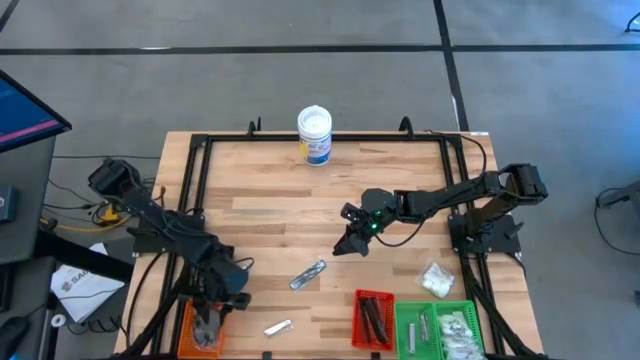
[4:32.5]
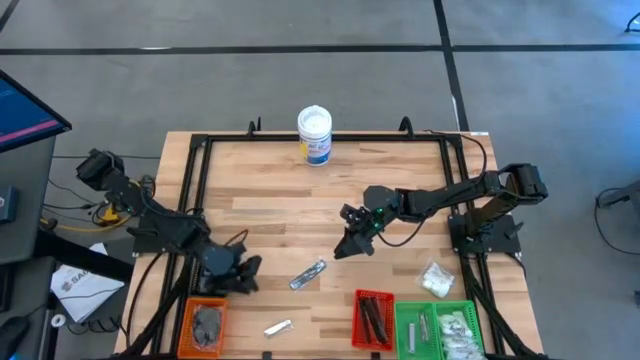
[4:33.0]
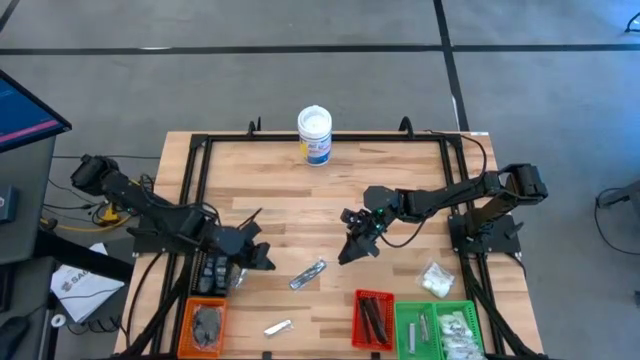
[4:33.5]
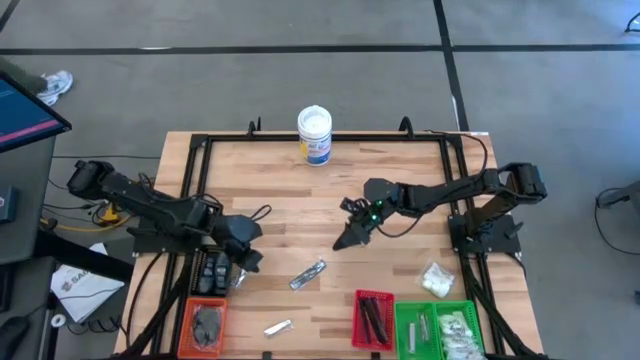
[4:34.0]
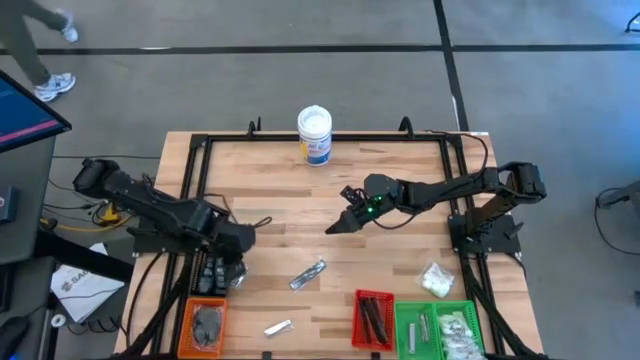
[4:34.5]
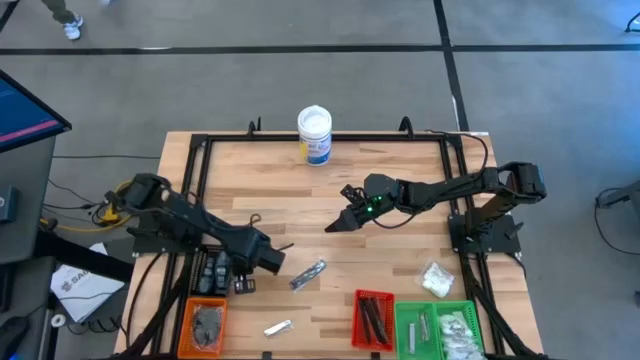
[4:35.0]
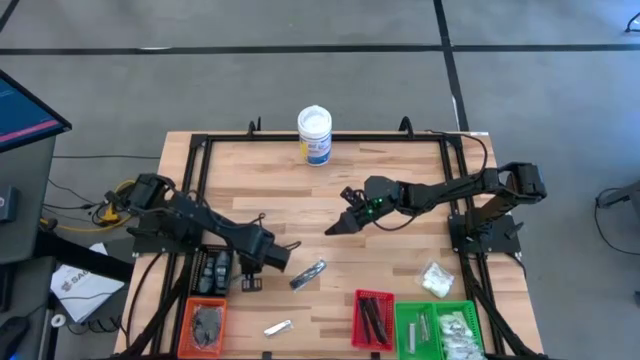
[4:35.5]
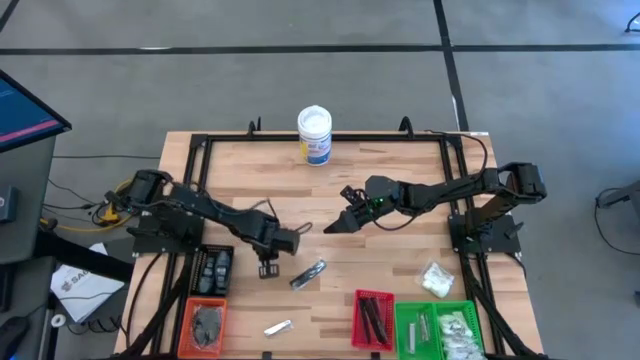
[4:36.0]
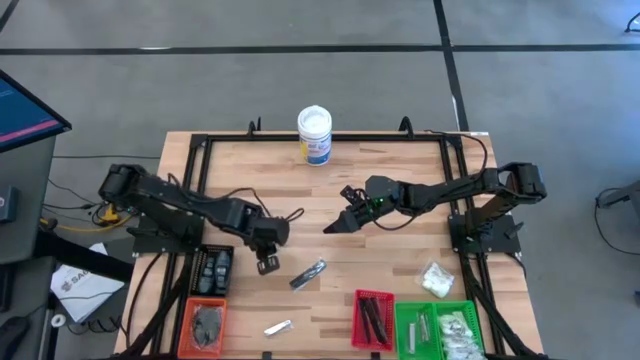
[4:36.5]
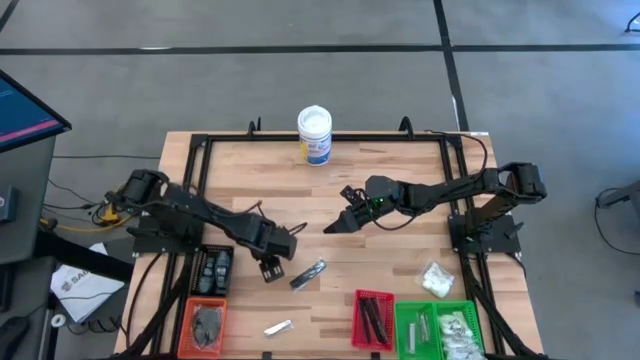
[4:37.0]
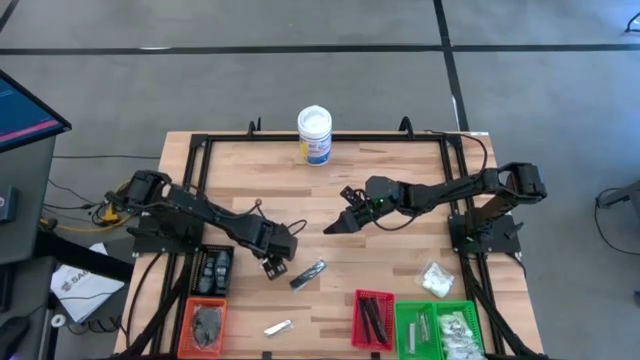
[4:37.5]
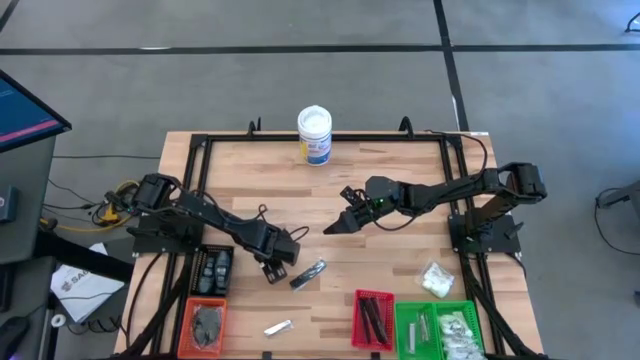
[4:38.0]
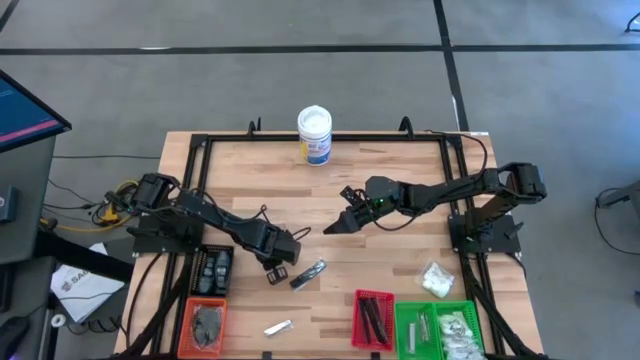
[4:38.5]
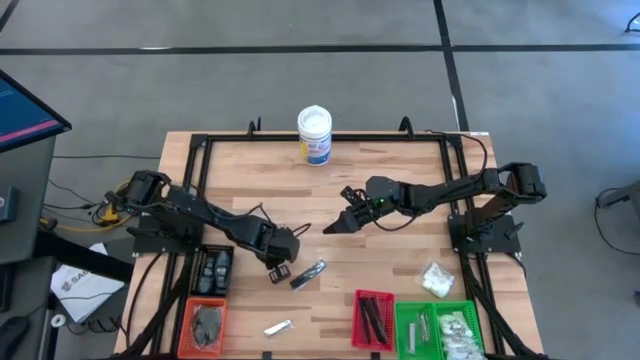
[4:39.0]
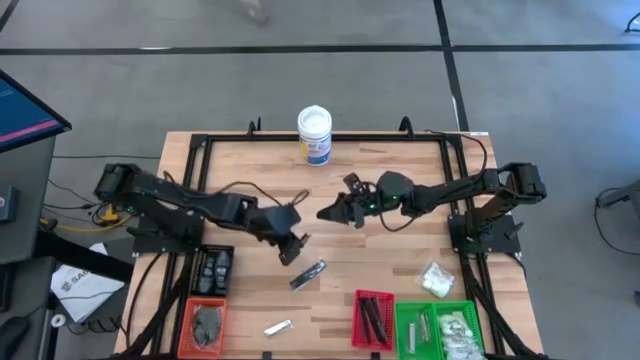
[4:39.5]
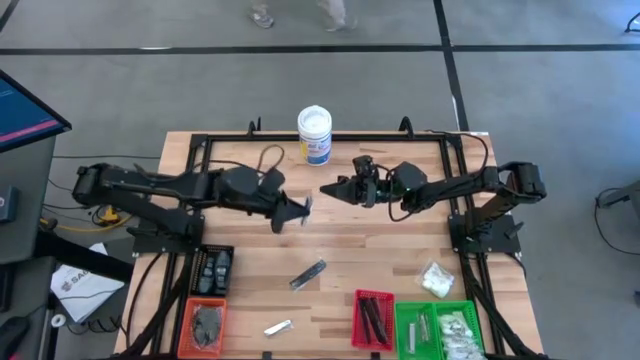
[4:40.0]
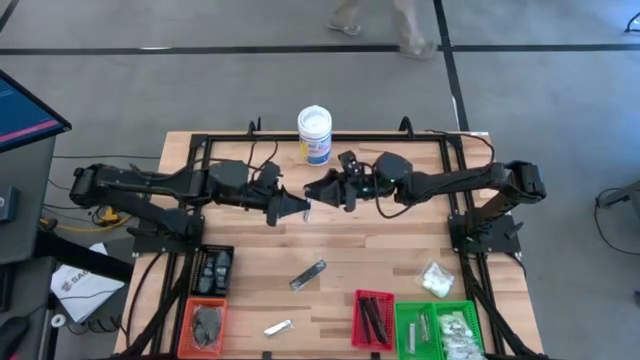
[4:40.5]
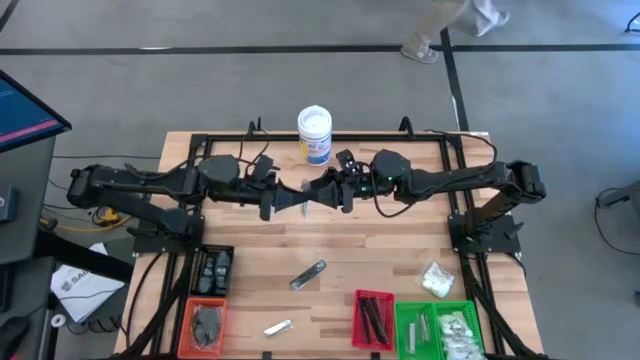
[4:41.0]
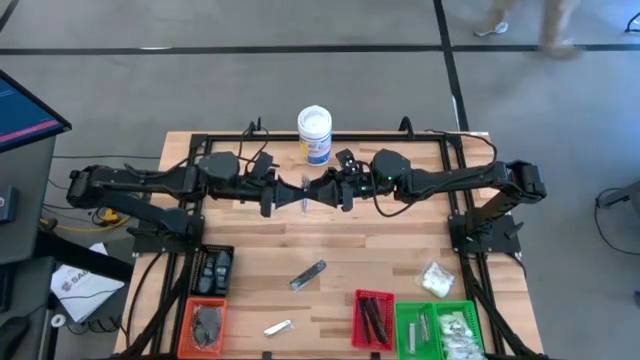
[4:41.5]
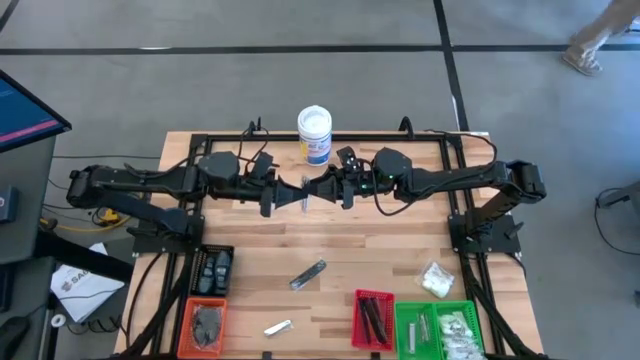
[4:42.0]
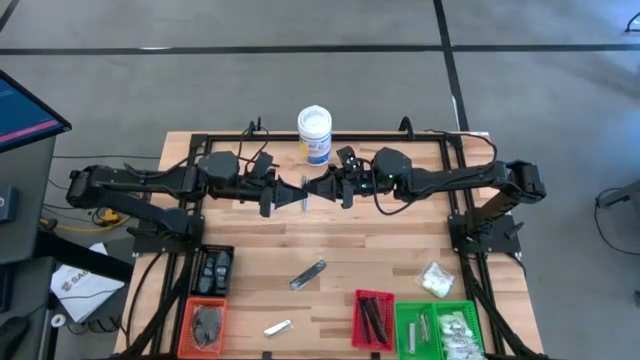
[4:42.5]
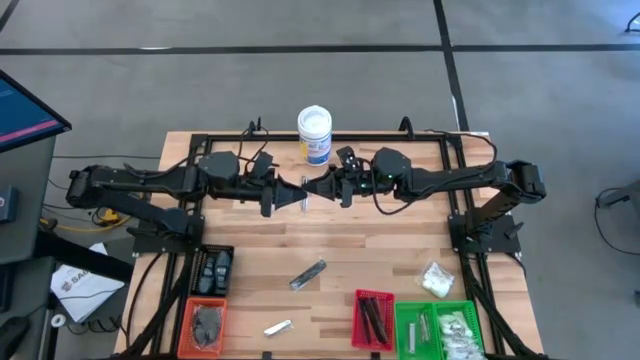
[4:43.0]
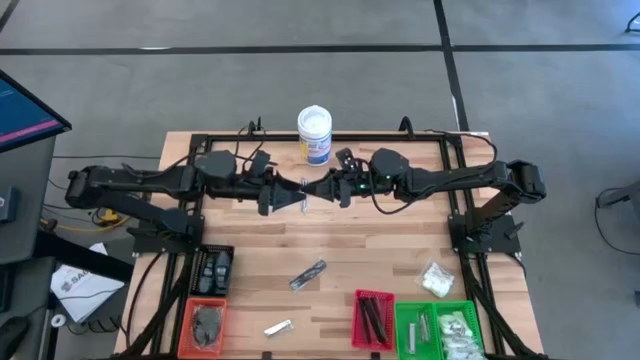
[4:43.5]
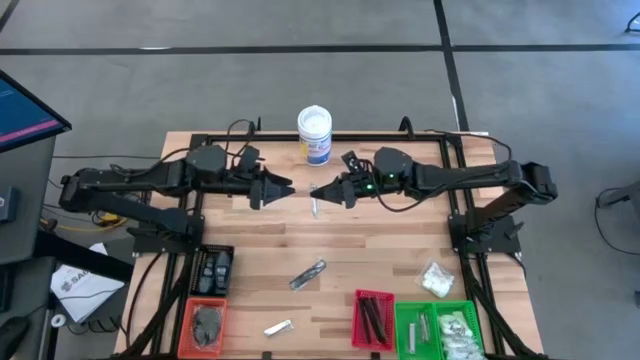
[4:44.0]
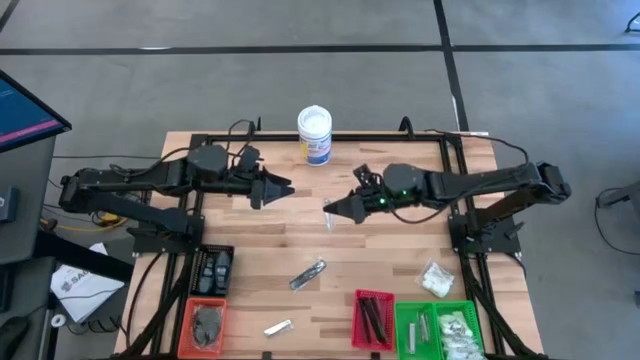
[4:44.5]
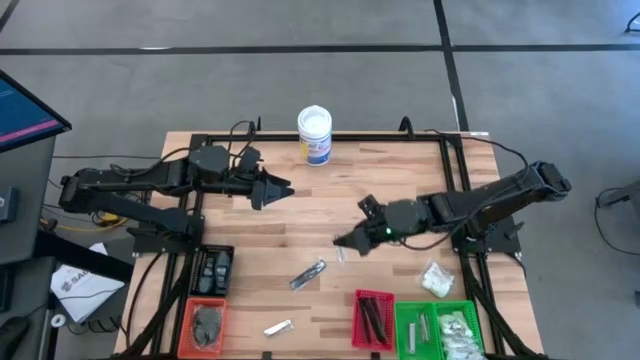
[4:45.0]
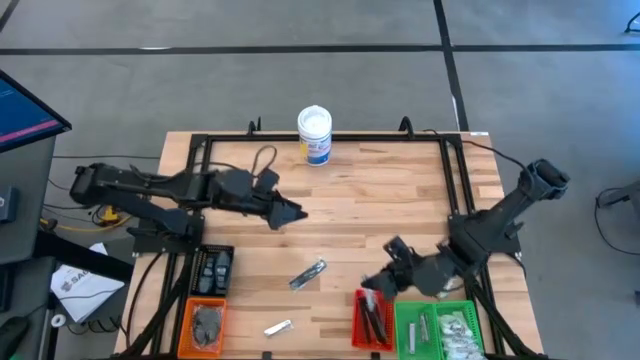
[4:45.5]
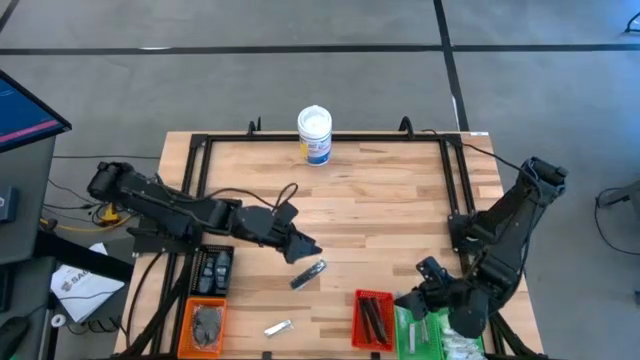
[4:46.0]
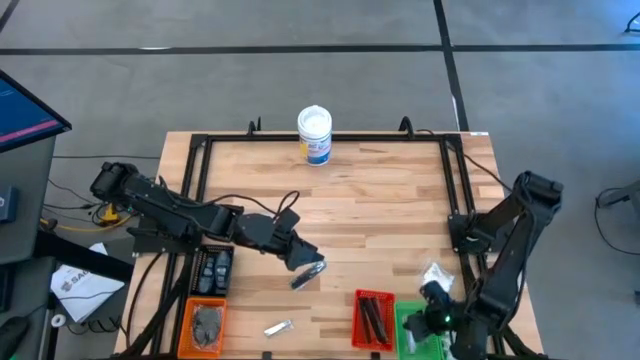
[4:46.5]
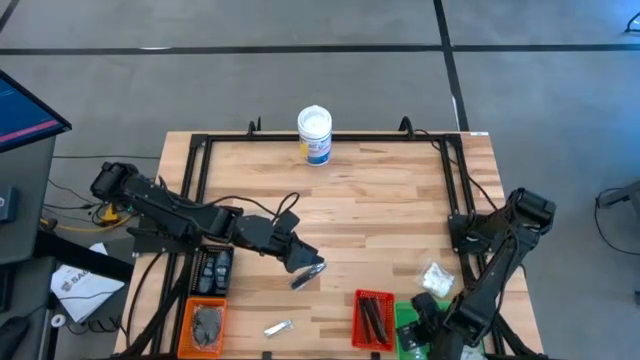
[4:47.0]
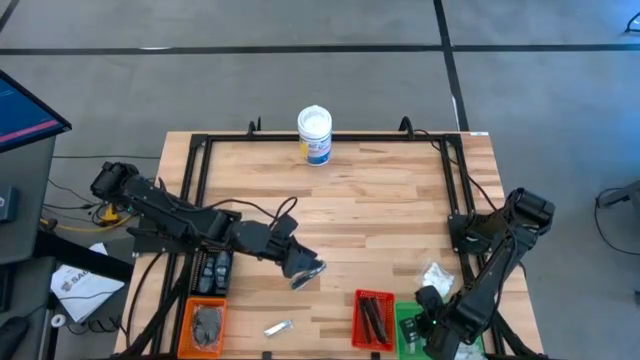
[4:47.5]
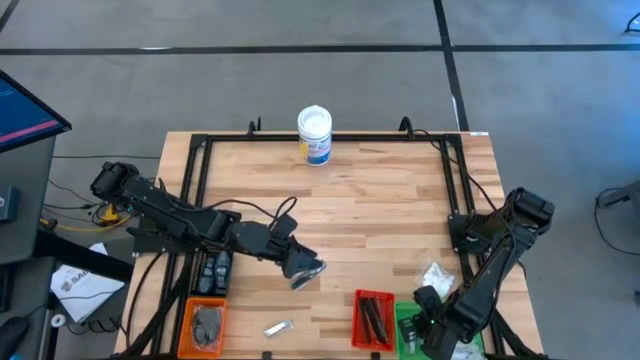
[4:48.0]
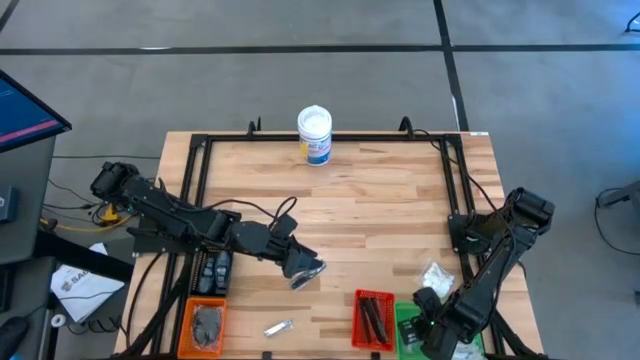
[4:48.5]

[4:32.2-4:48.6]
Task: Pick & Place Travel size toiletries
Put the silver nail cutter into the left green bin

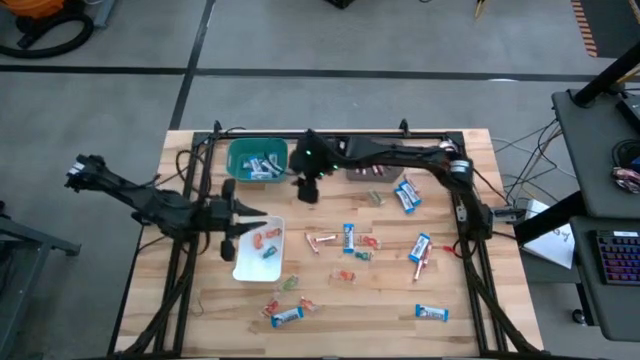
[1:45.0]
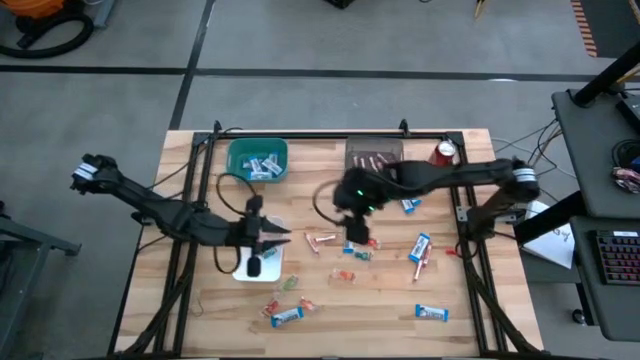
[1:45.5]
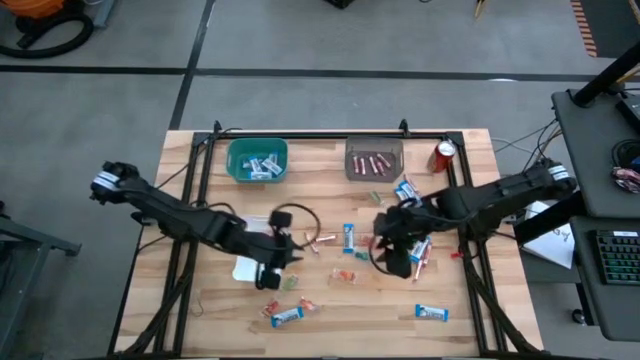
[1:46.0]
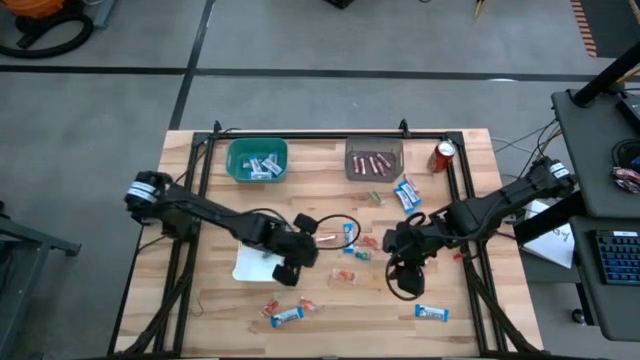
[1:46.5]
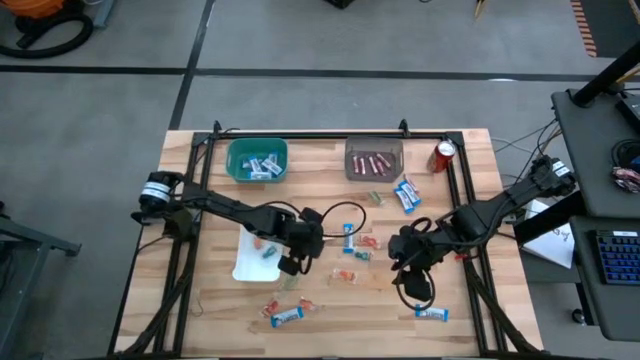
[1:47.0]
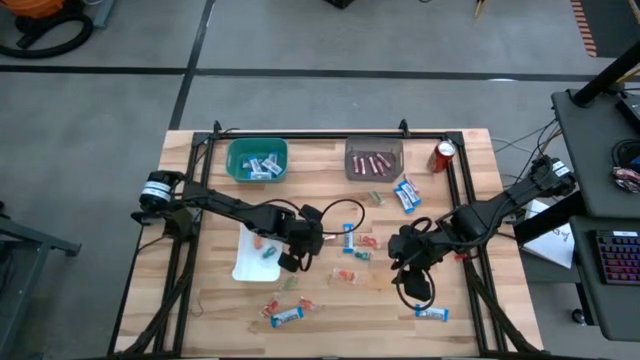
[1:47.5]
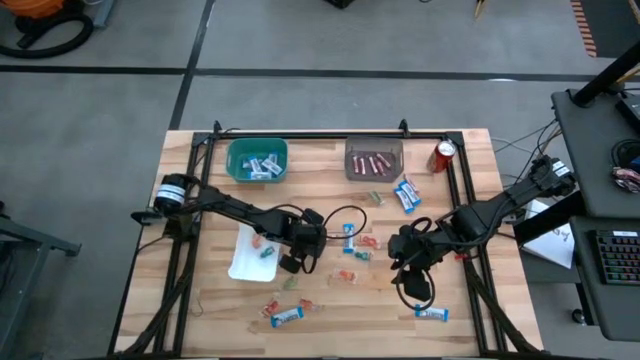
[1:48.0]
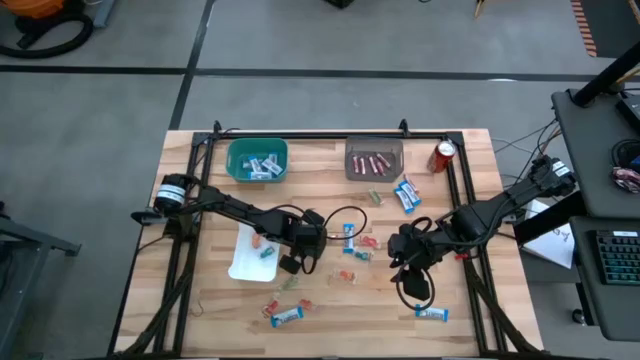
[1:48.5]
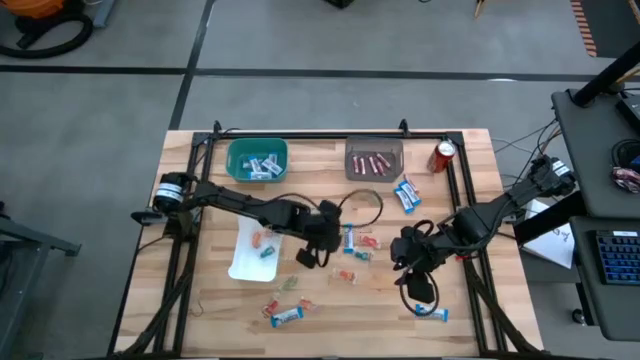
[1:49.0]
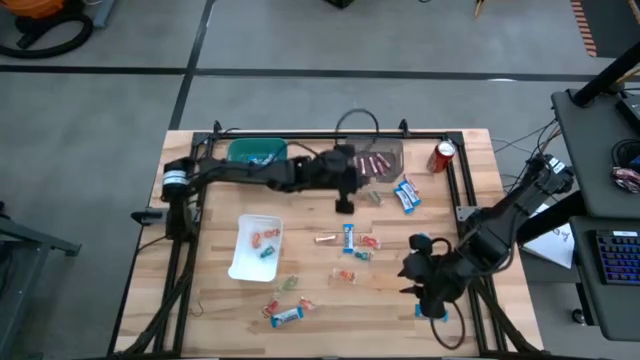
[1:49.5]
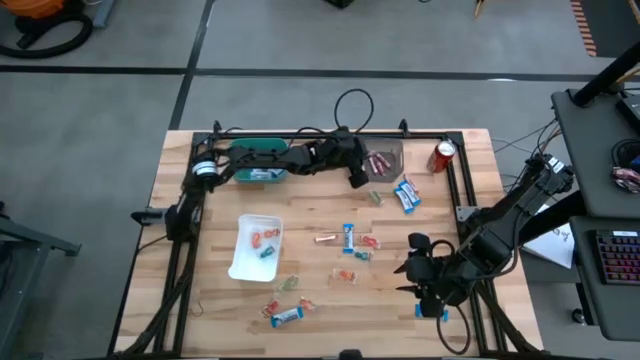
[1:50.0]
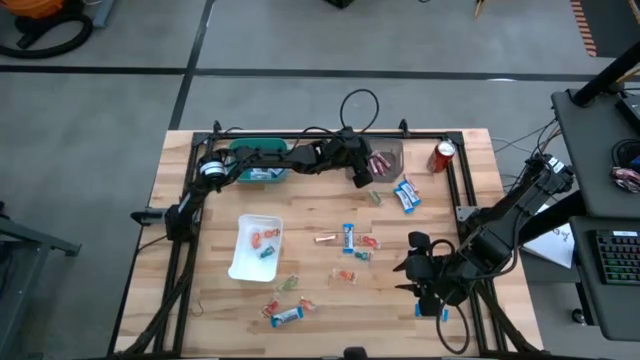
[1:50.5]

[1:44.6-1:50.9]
Task: Sort candy
Put the transparent candy rolls into the black bin
